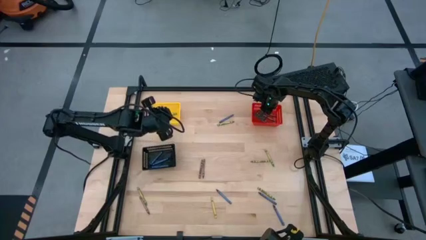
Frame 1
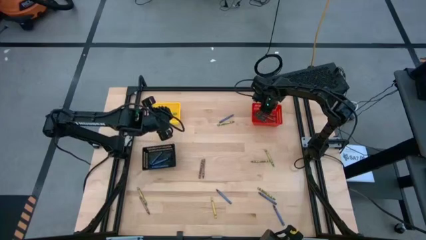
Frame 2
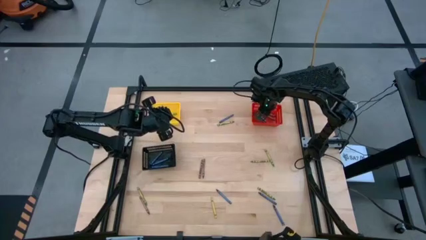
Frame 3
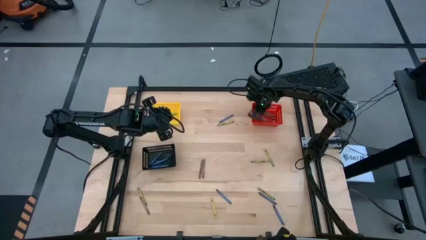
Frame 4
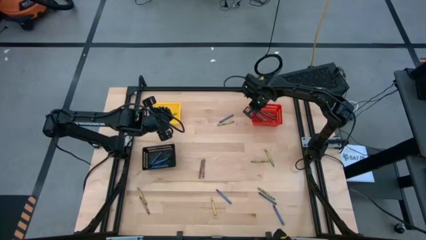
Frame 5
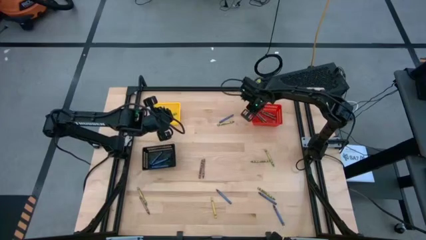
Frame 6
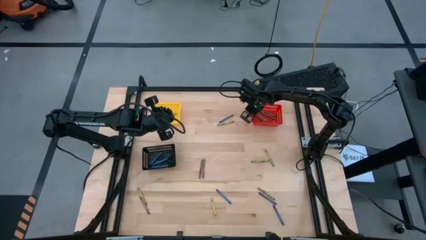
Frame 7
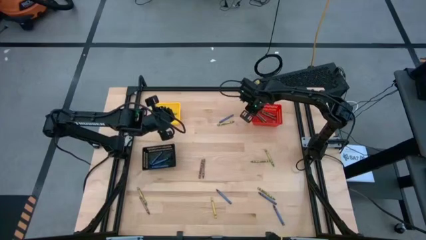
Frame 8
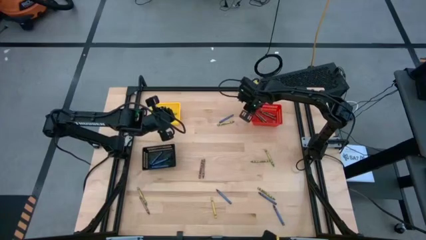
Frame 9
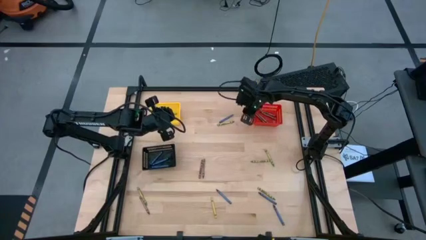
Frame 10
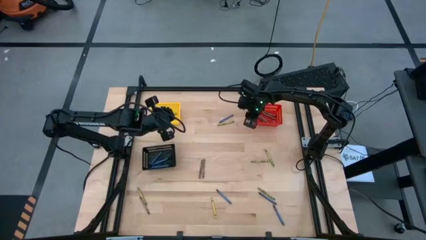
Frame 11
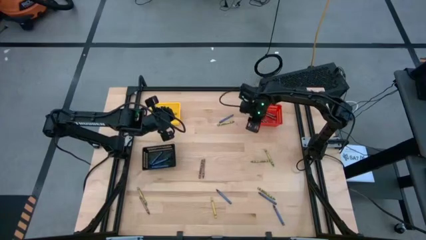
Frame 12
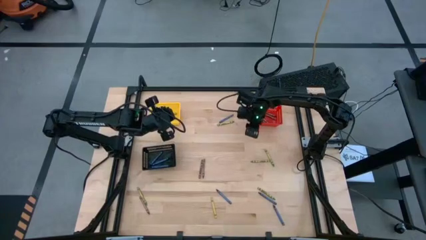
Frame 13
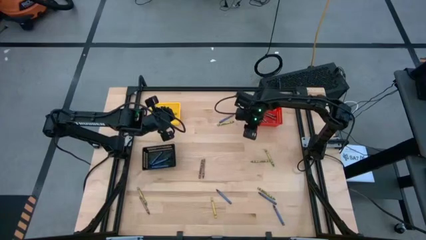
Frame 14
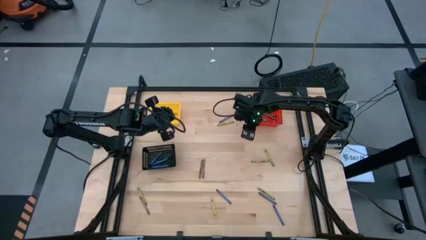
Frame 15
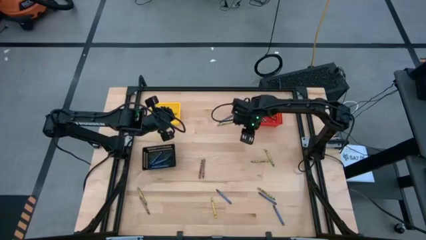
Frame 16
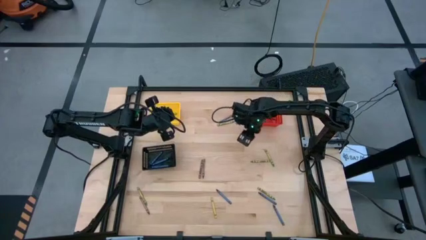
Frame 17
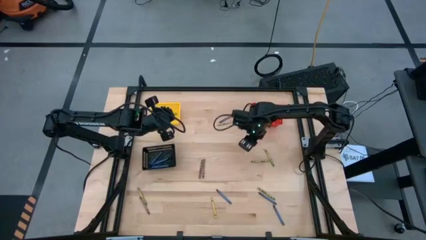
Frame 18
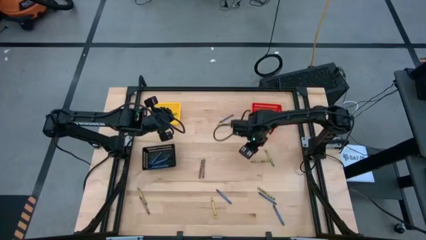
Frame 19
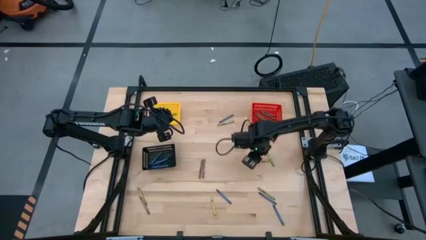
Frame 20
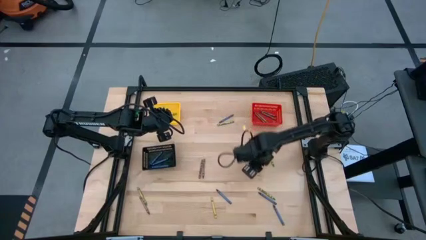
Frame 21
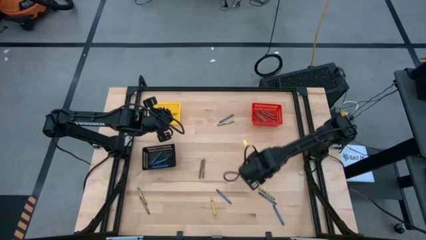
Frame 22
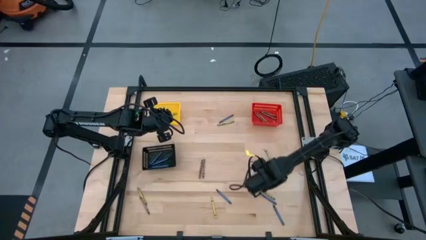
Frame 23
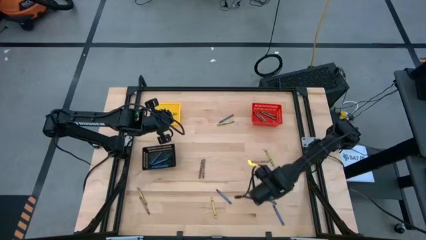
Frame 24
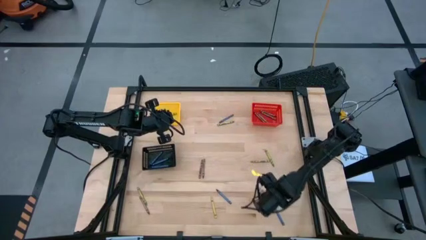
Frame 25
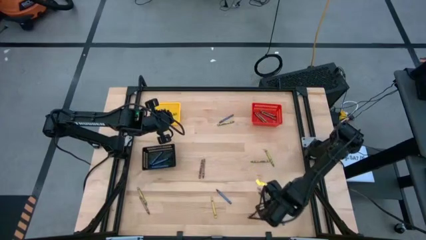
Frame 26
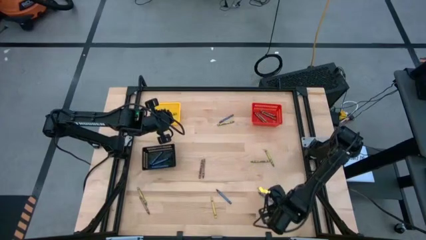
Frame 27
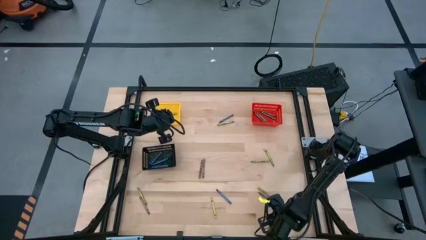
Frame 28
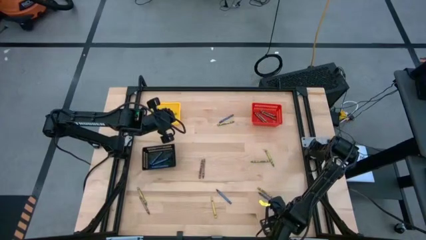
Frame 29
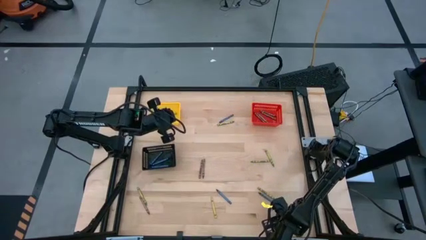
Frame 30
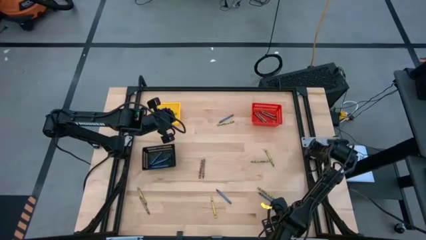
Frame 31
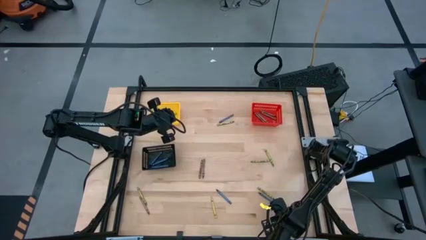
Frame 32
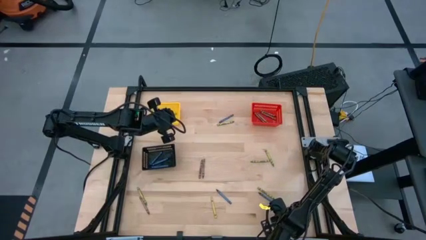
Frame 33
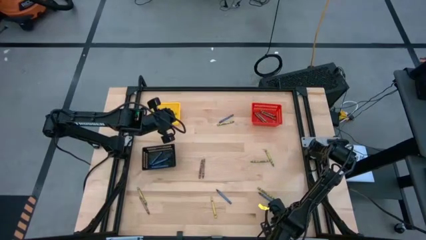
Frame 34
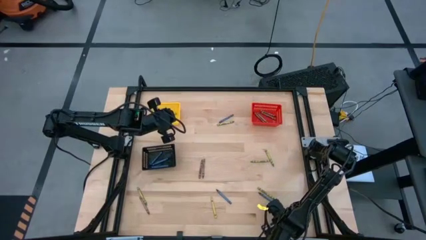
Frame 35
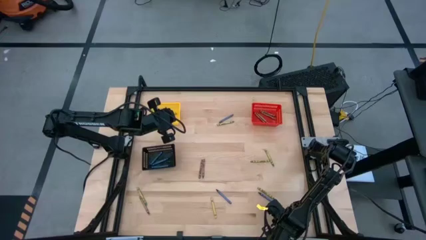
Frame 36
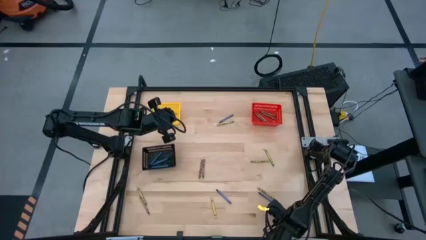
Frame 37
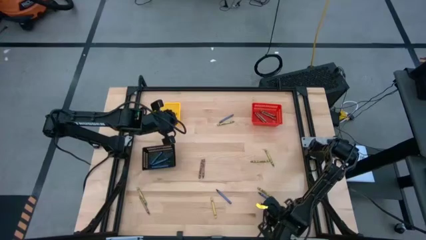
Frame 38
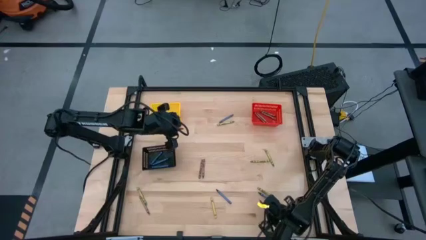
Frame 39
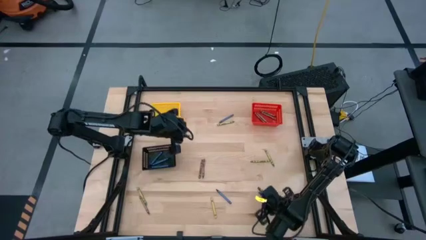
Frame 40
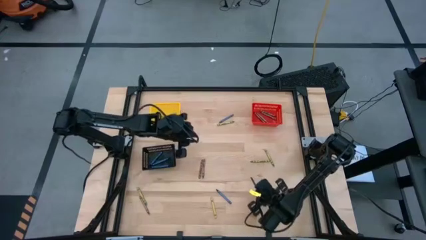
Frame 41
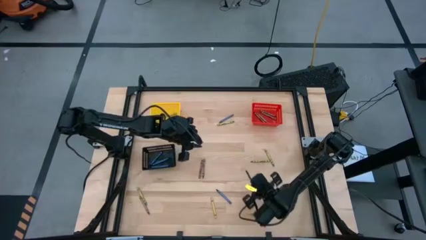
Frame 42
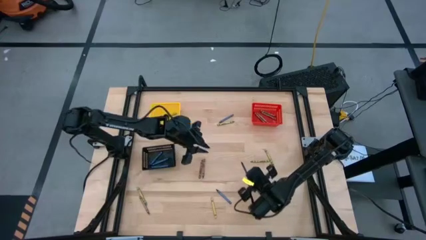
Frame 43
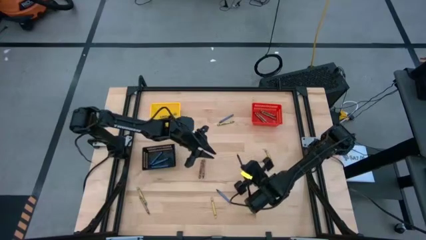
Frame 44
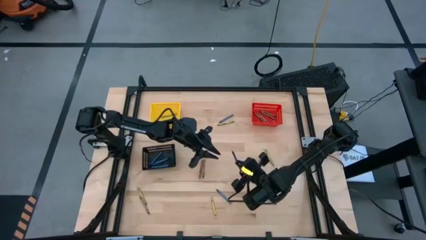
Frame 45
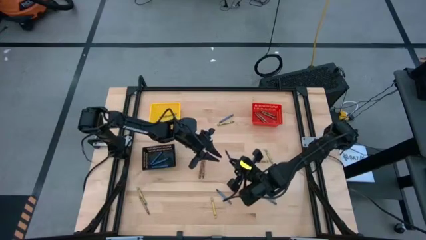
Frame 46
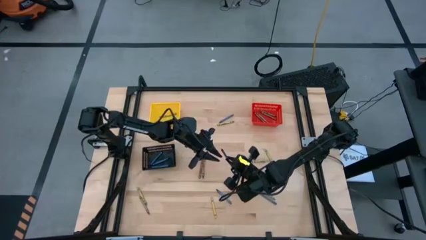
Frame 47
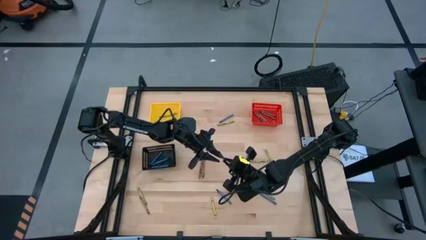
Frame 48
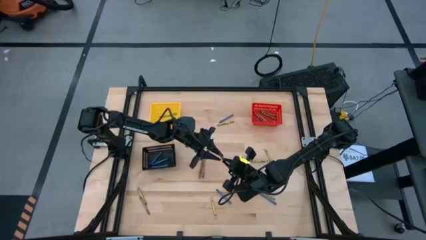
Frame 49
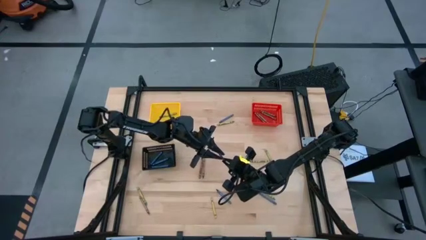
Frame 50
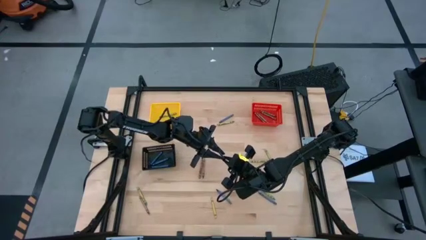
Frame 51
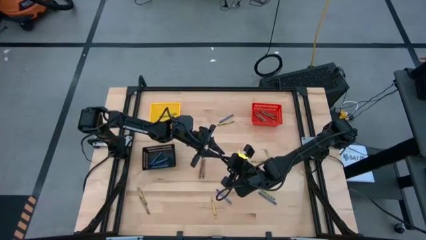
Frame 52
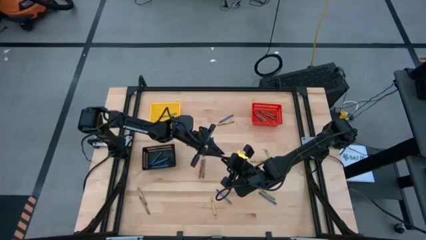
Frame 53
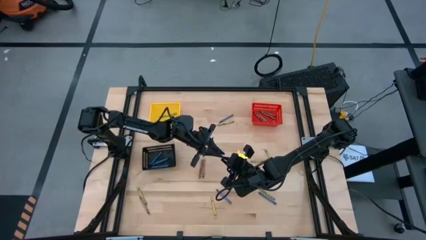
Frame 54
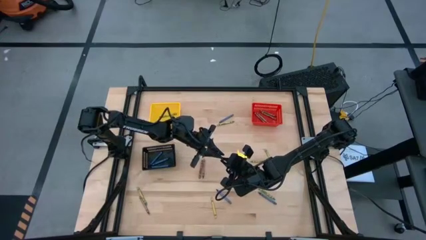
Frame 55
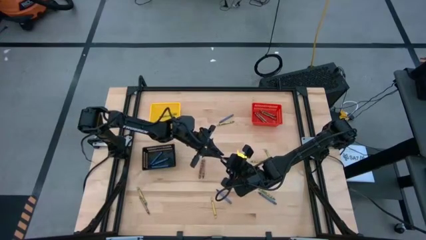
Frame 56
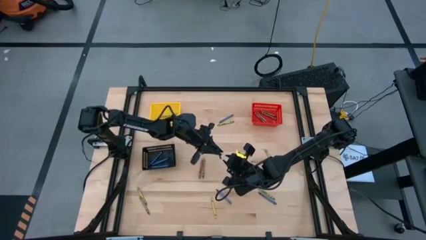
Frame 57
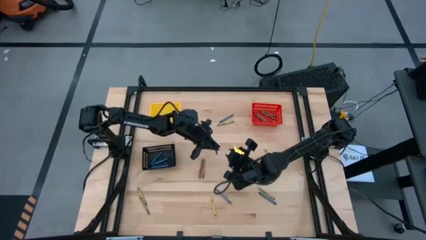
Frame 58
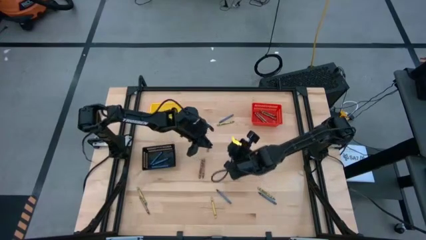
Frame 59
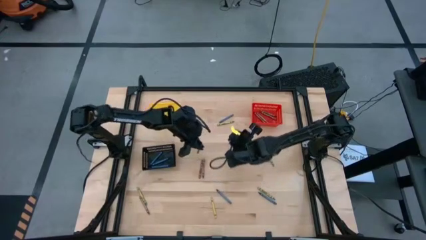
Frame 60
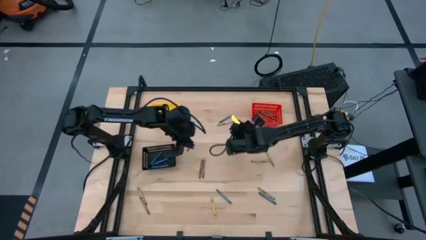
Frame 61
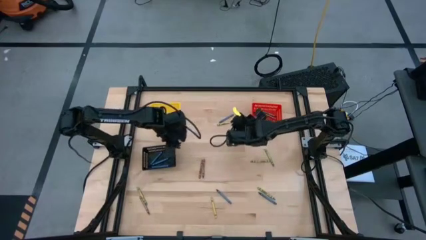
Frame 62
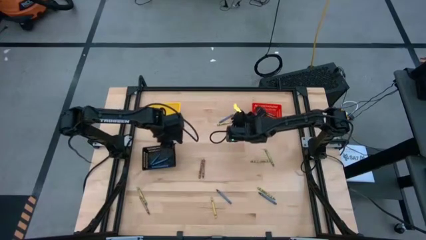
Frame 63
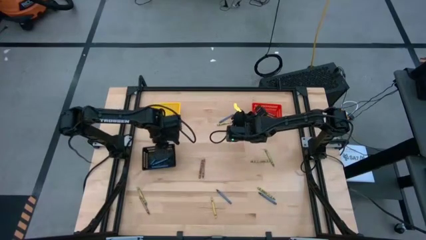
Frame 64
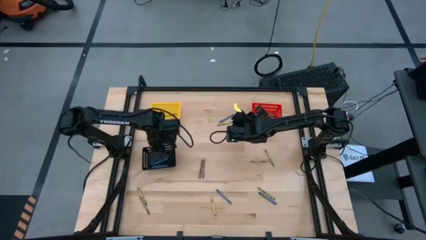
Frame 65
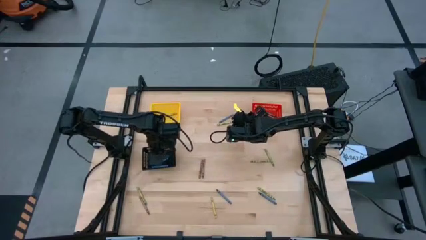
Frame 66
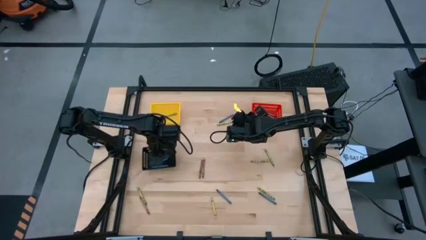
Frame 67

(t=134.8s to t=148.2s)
Task: Sort crayons
Put the blue crayon into the black bin

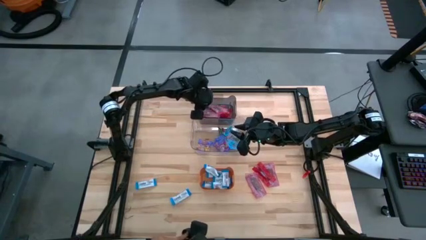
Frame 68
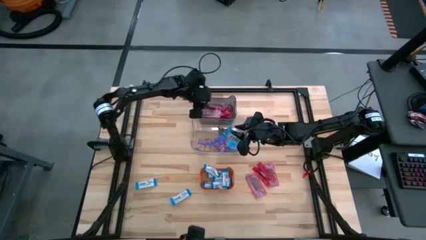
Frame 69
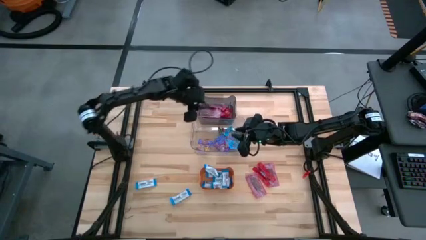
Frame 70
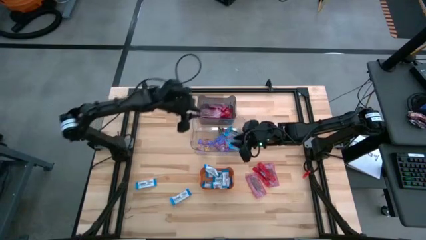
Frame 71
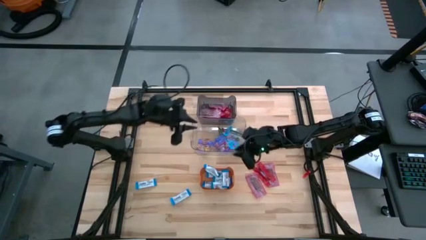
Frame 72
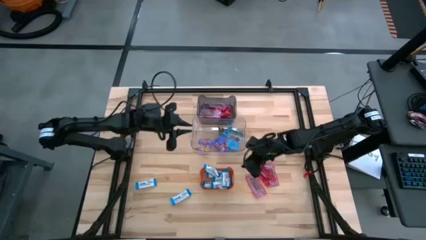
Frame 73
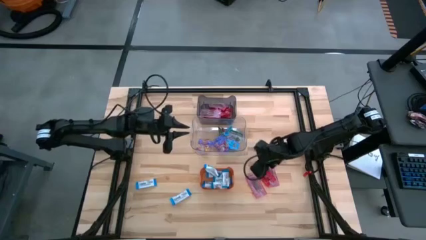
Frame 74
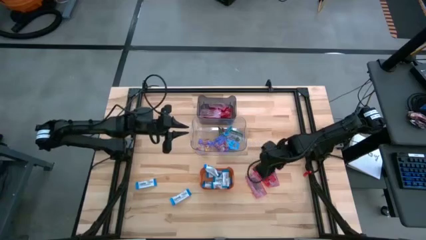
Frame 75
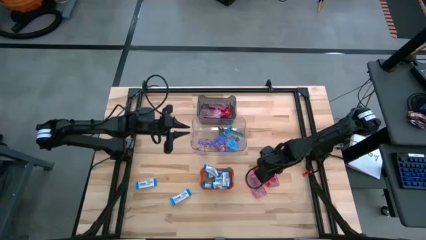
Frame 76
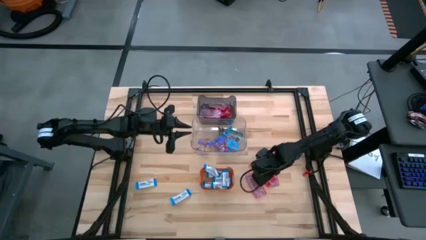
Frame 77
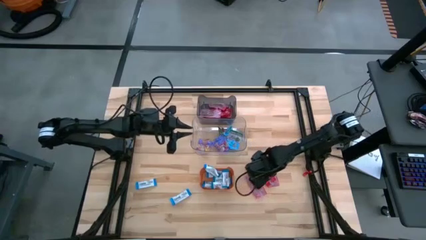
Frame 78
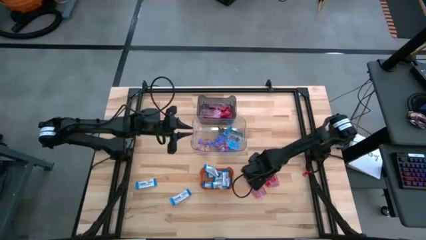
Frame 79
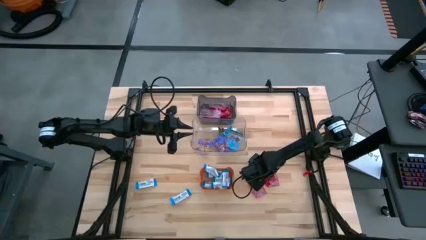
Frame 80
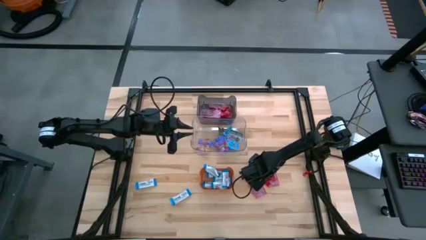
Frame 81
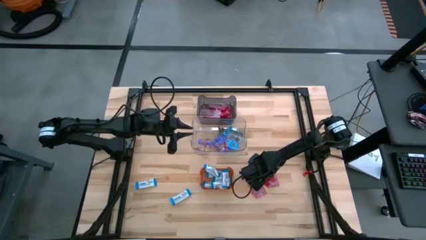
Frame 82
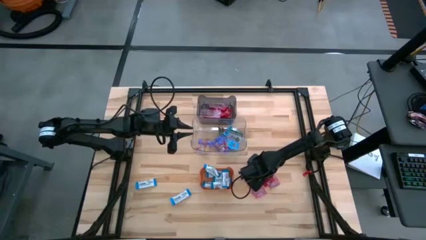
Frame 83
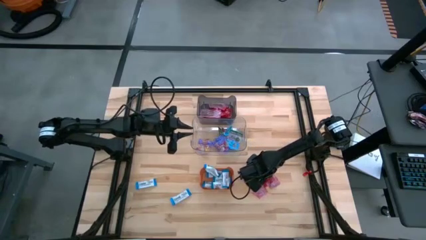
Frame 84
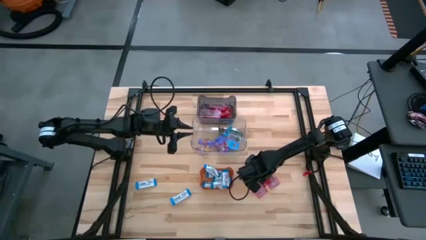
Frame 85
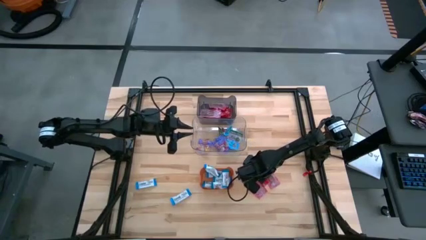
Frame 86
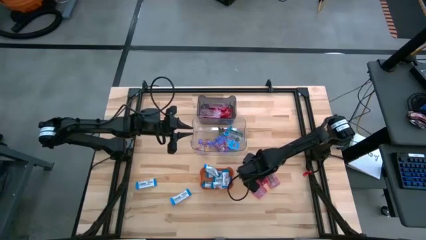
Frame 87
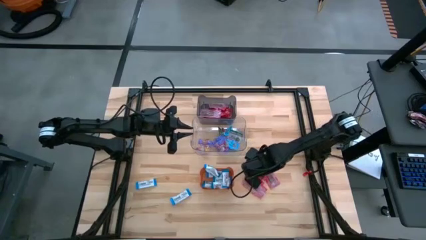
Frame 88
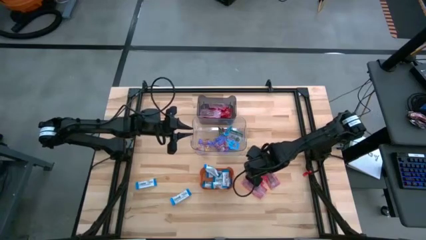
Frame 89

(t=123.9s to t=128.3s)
Task: Sort candy
Put the red candy into the black transparent bin
